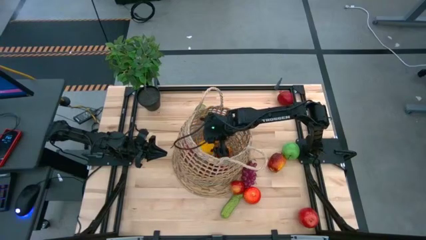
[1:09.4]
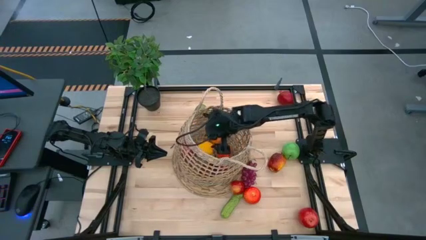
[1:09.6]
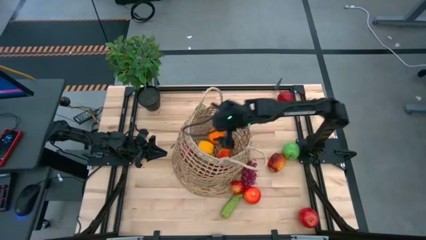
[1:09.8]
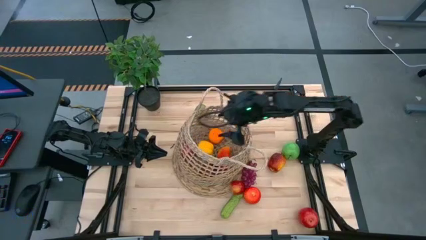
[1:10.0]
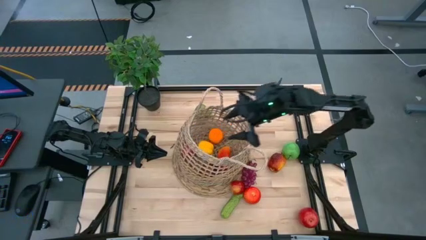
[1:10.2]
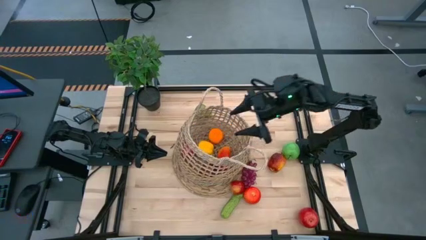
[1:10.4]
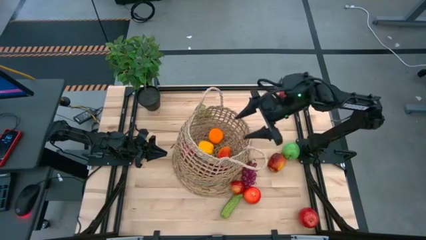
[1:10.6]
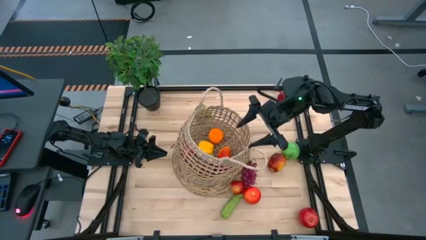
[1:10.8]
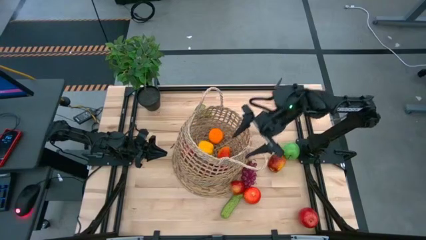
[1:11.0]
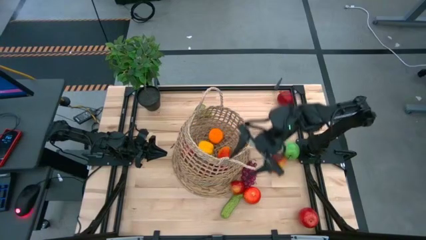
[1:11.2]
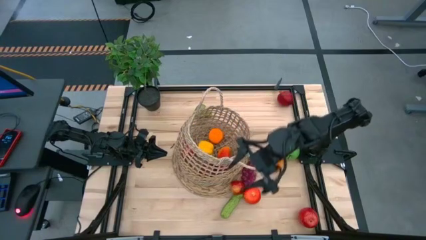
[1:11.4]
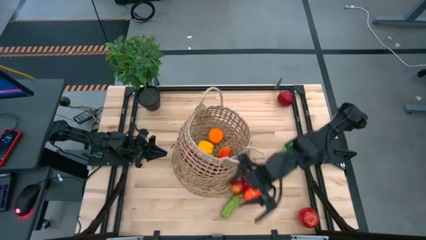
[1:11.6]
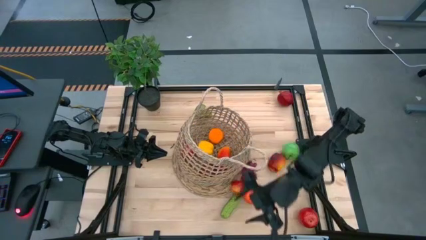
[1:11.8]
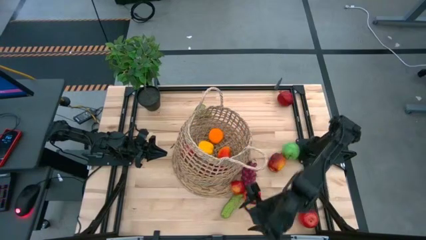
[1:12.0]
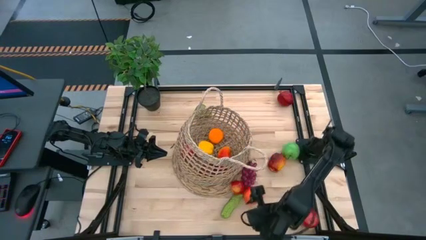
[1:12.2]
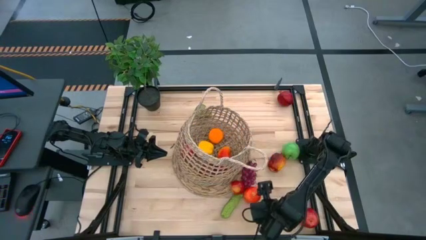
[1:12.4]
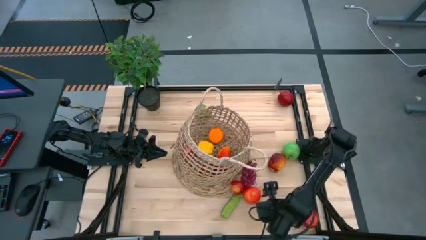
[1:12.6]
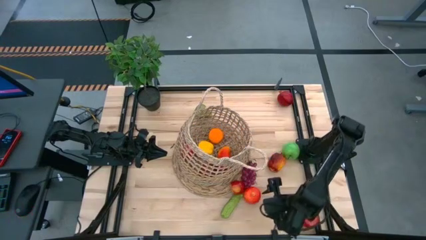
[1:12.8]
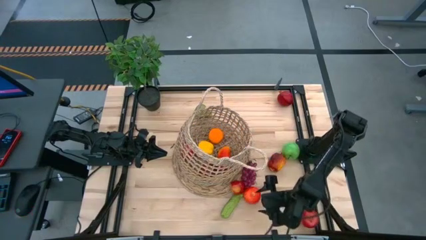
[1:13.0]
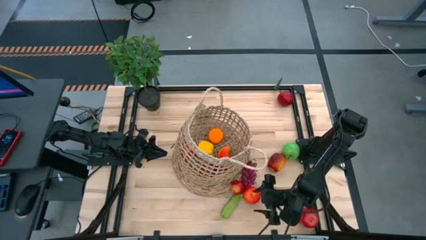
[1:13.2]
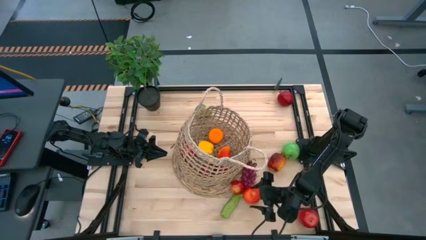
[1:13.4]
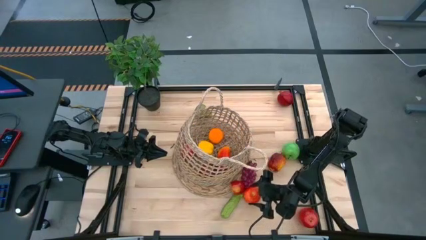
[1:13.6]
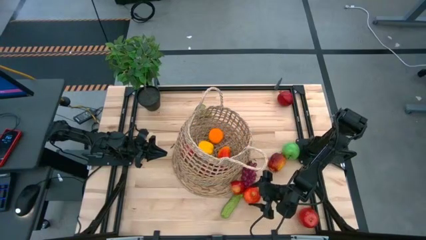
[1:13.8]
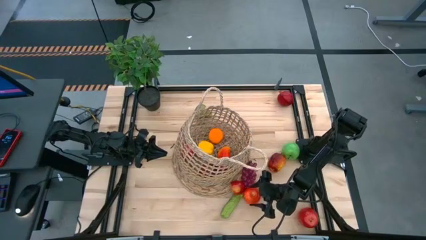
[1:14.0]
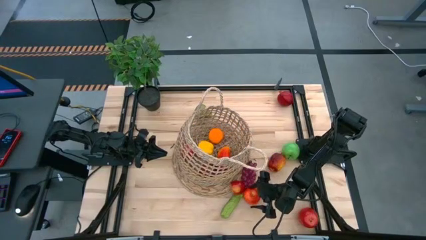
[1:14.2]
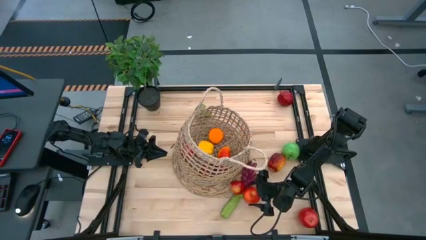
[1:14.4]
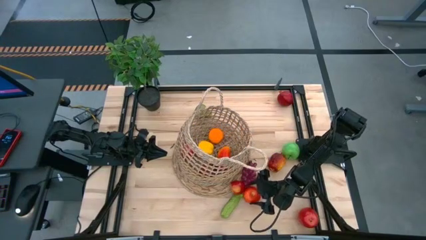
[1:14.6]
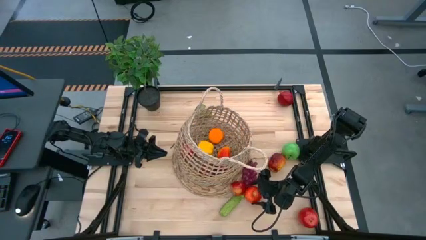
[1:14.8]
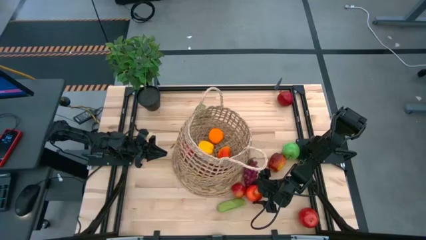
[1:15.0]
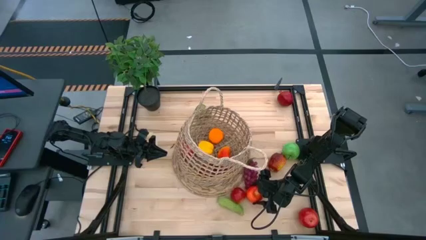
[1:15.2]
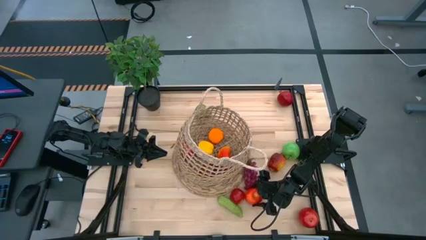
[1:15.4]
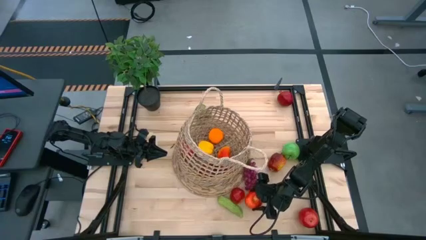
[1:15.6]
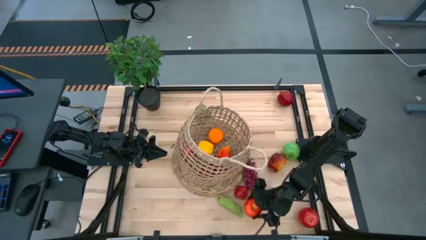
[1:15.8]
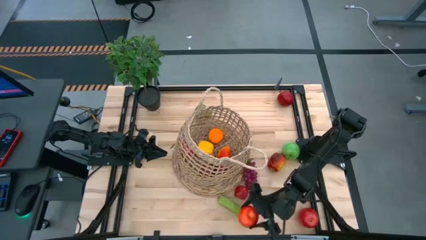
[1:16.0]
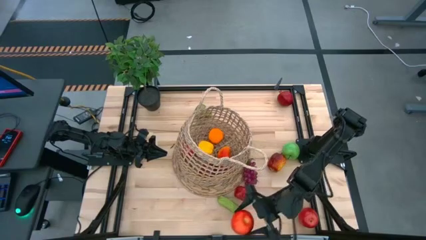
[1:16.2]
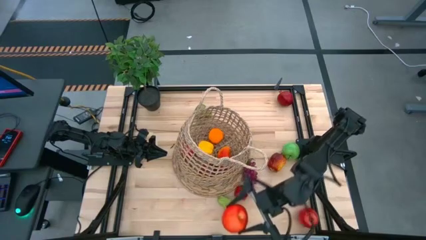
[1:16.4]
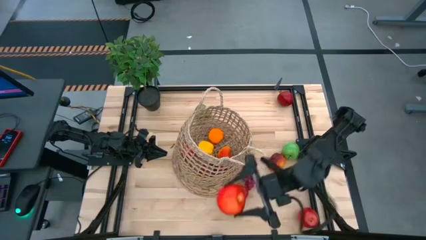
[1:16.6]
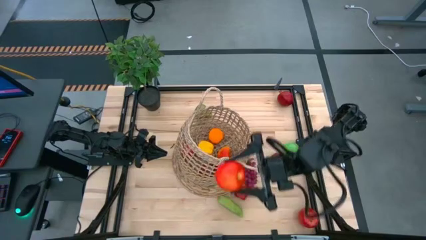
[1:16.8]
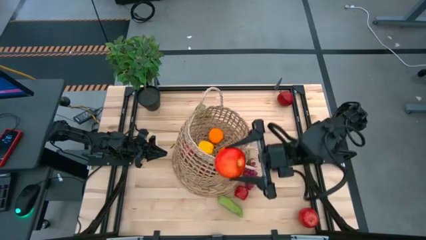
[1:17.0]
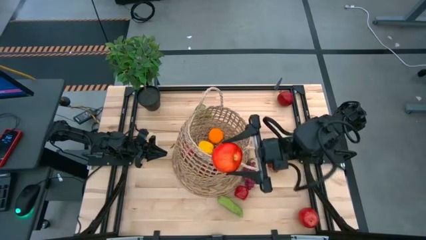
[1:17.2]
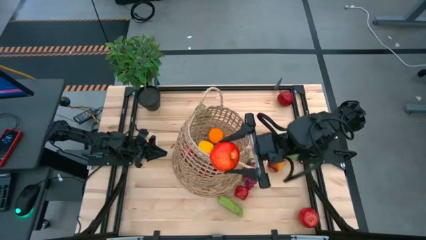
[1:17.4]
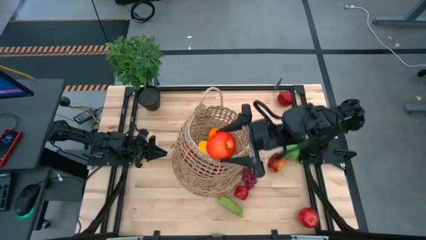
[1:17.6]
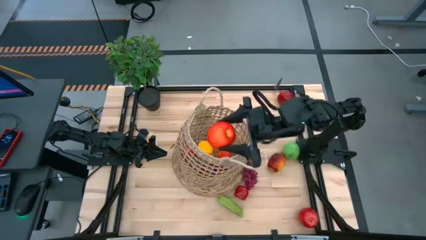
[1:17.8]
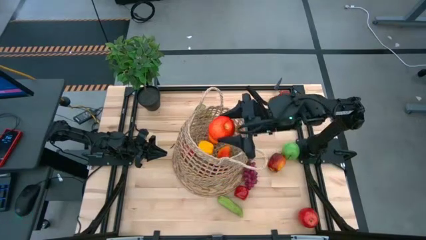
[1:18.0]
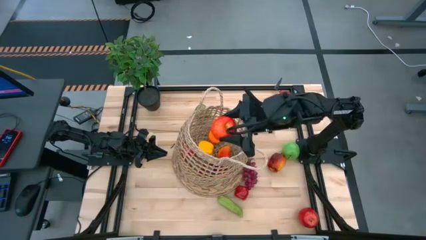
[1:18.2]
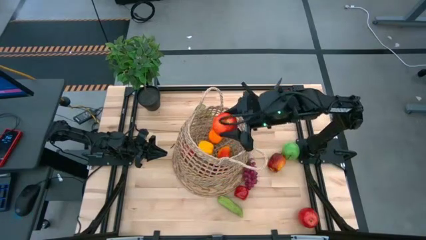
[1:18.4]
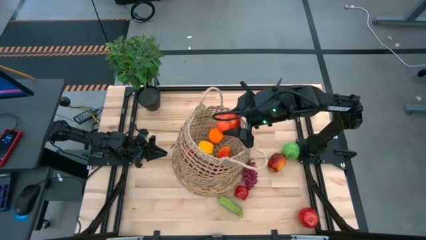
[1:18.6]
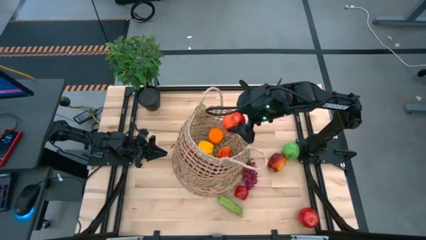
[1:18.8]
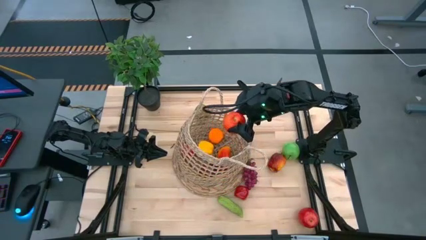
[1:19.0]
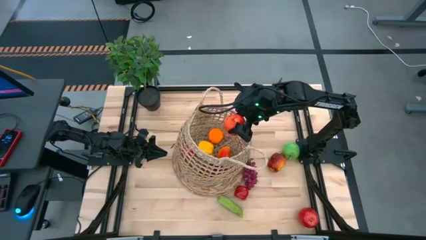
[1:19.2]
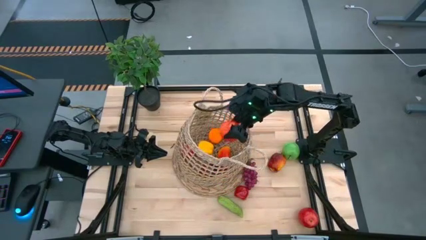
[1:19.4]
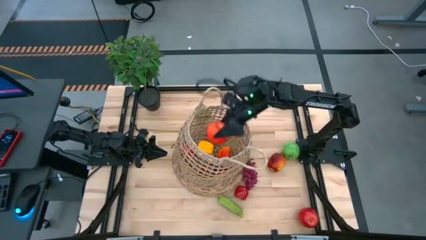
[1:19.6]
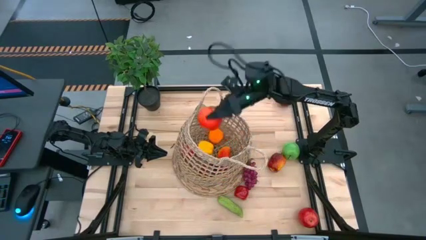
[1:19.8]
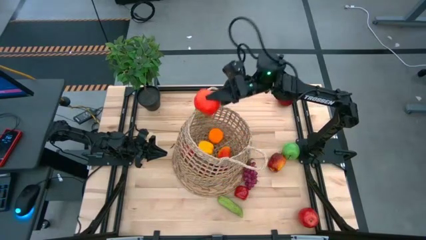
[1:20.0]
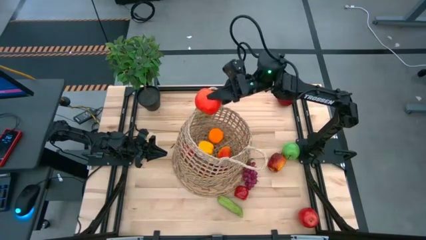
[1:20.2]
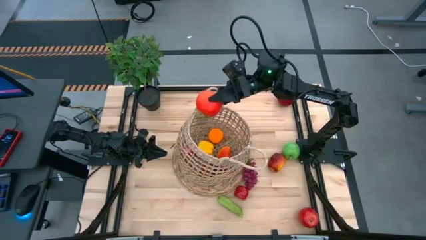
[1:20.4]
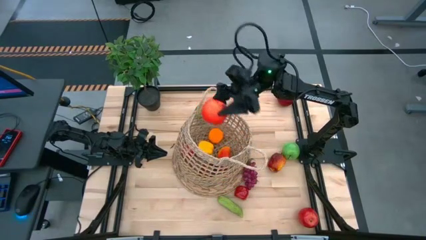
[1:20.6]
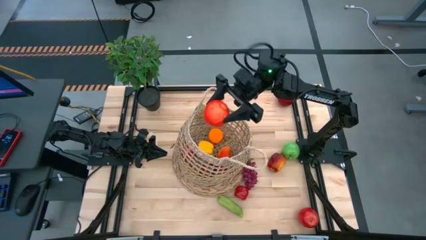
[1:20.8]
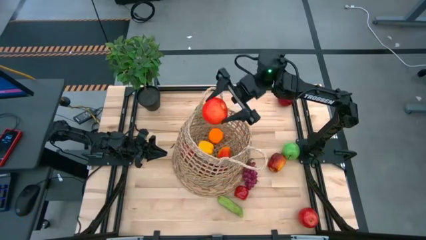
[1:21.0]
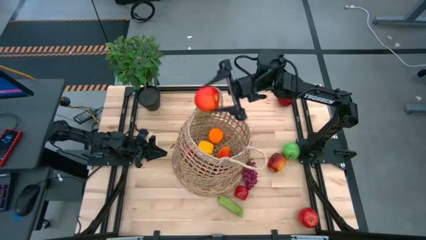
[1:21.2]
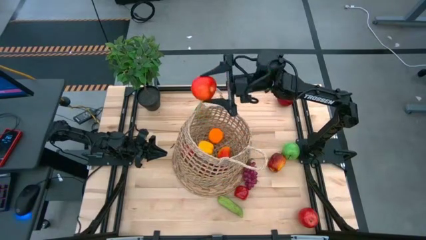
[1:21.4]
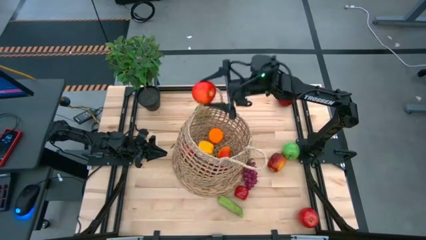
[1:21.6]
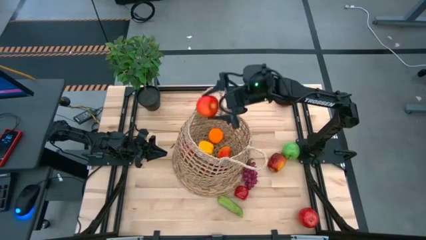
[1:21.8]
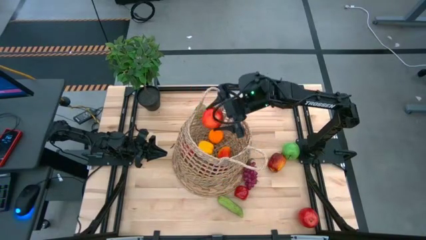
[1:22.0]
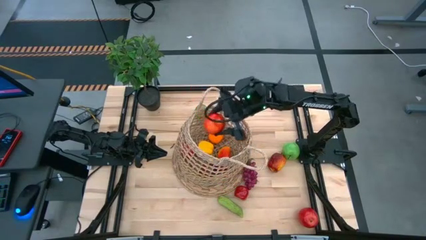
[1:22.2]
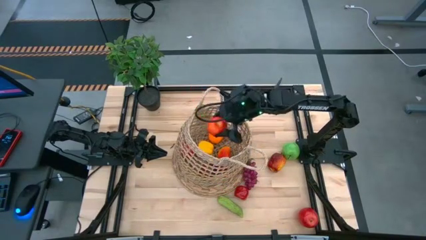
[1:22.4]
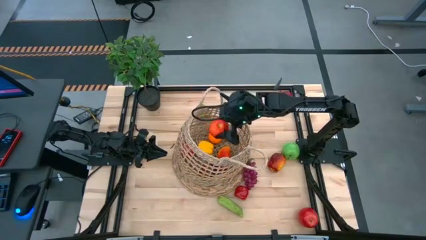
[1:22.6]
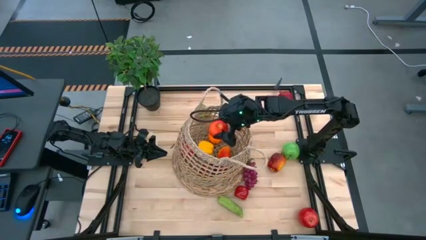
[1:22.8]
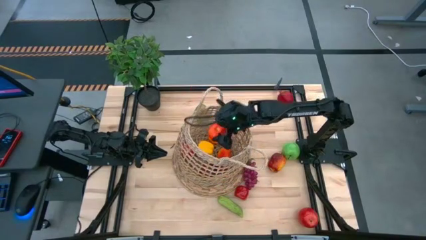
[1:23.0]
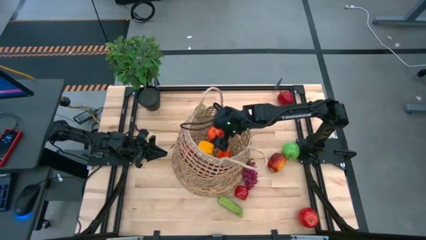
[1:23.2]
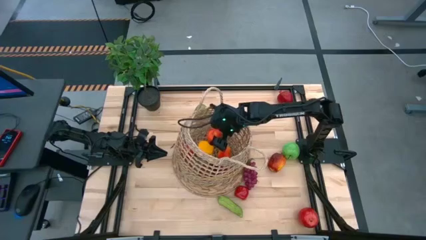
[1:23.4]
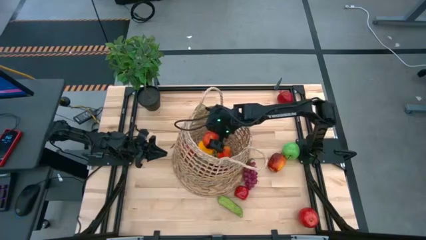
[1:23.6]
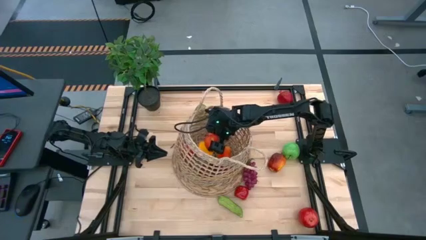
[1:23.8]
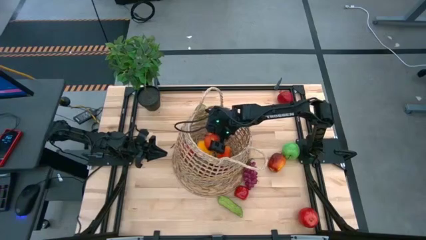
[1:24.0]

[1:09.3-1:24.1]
Task: Build produce basket
Put the red apple into the brown basket

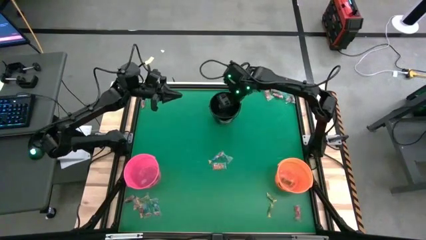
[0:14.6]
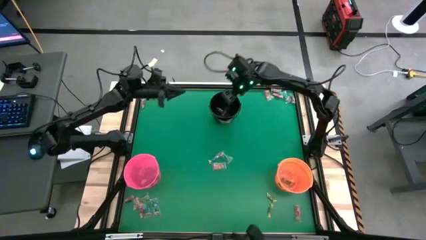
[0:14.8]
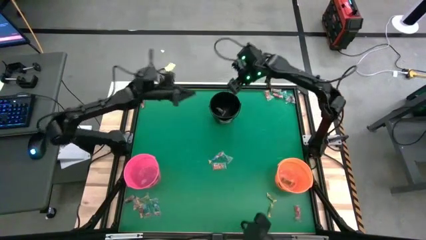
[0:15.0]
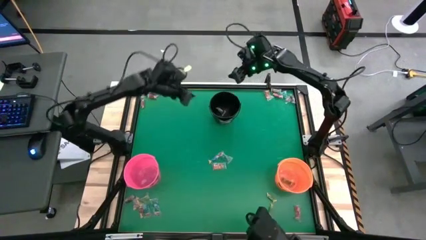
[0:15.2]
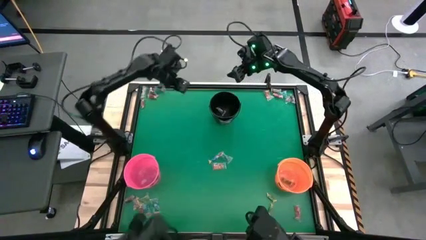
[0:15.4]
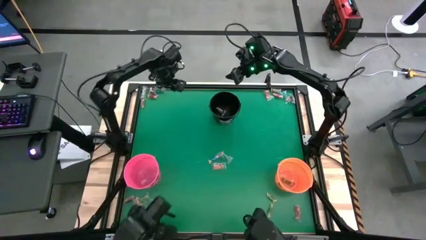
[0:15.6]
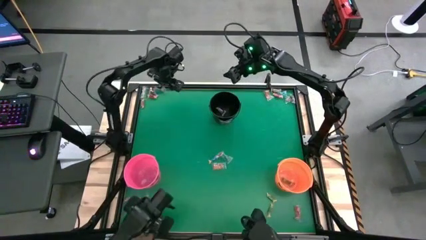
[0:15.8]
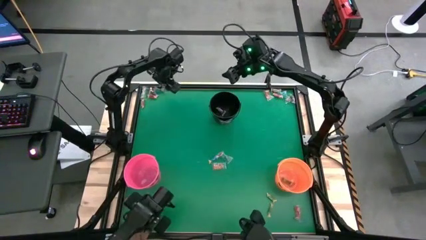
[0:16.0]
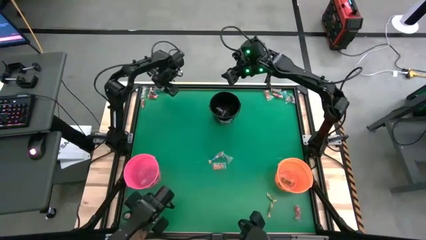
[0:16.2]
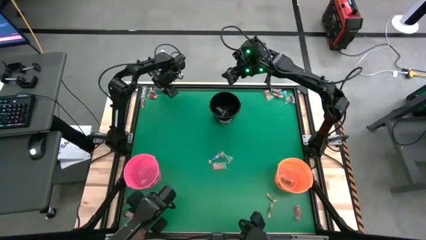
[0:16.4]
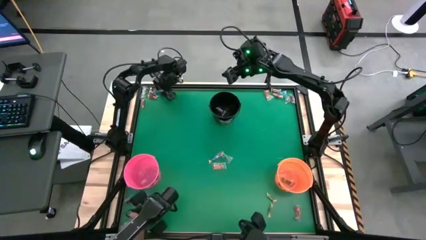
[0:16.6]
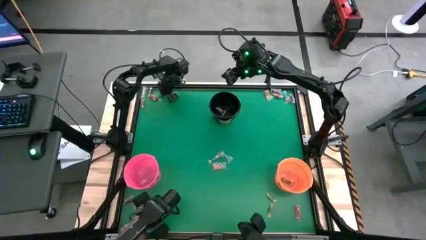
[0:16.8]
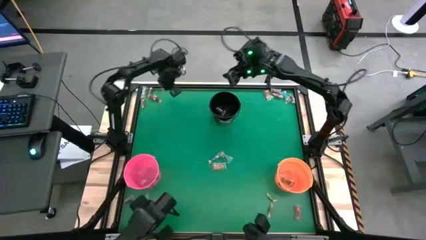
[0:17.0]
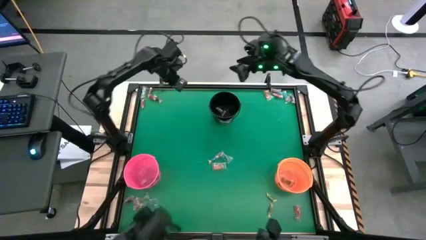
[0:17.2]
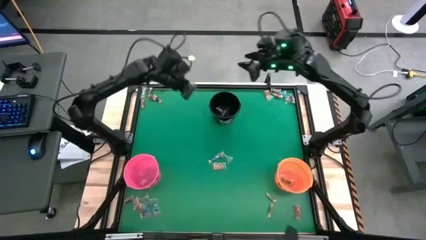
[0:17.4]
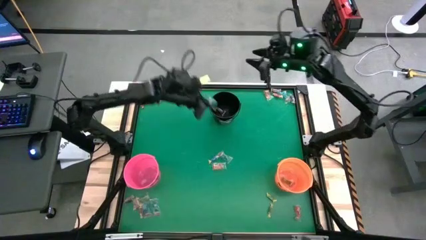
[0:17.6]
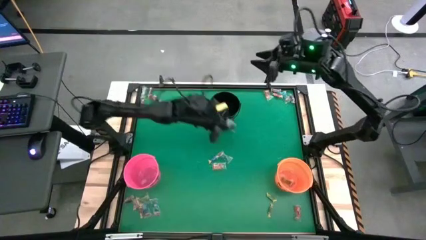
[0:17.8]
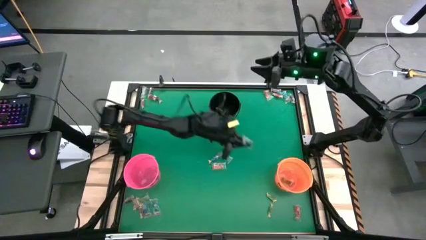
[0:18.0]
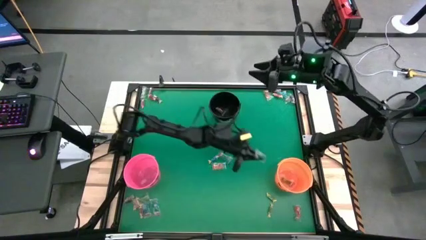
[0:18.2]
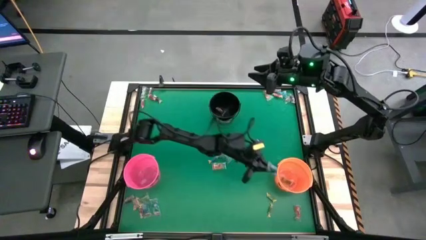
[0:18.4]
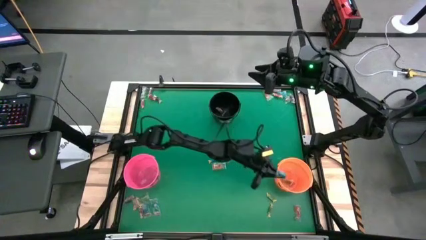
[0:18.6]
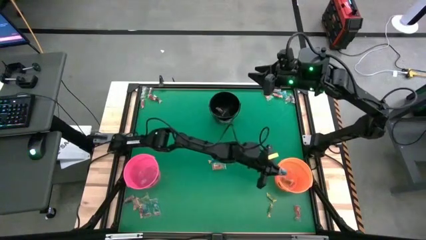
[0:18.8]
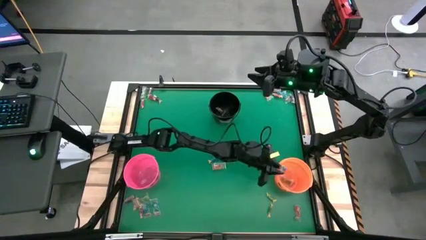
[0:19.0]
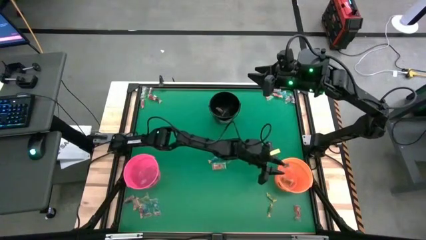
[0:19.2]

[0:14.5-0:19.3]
Task: Sort candy by brand, put in halloween buckets
Put the blue gummy into the orange bucket
